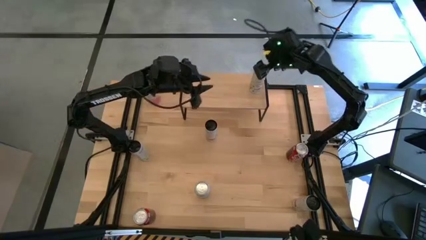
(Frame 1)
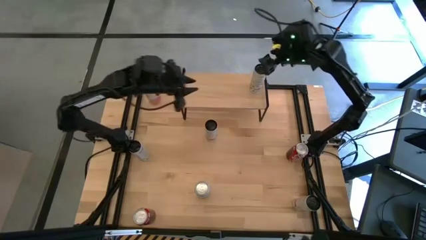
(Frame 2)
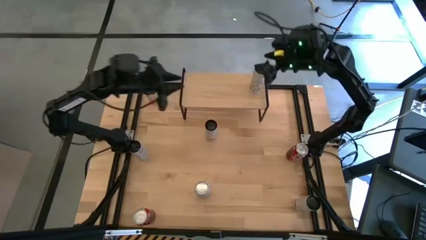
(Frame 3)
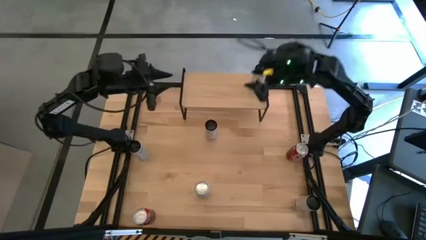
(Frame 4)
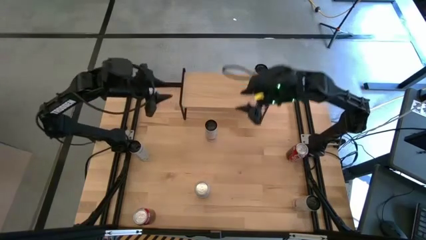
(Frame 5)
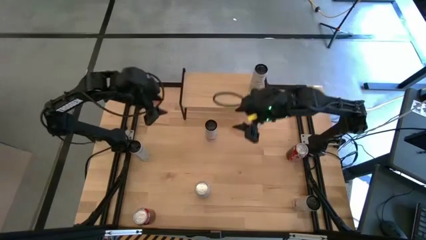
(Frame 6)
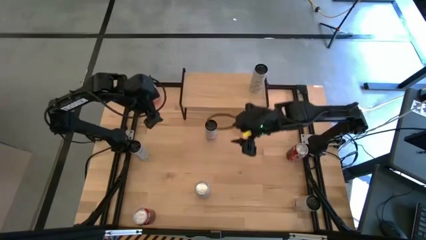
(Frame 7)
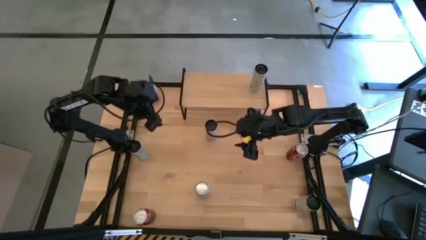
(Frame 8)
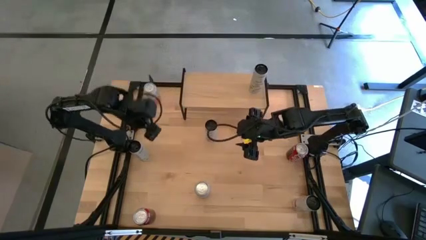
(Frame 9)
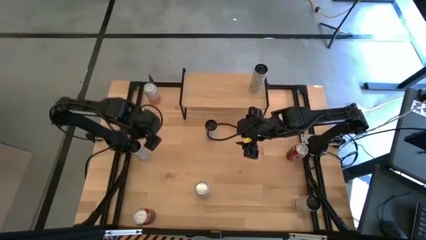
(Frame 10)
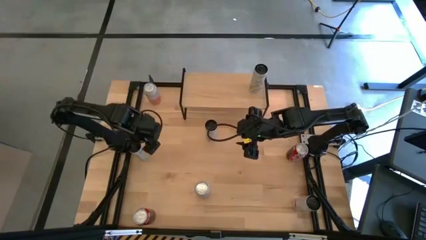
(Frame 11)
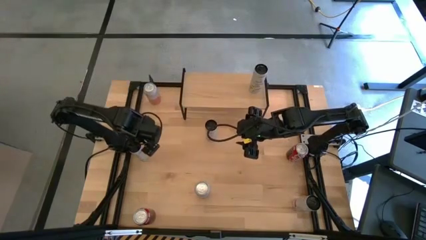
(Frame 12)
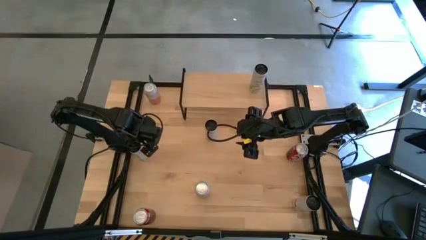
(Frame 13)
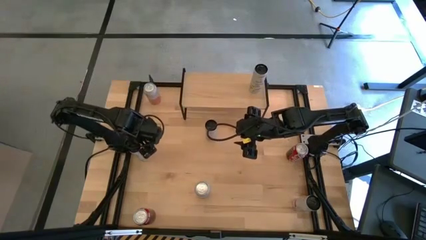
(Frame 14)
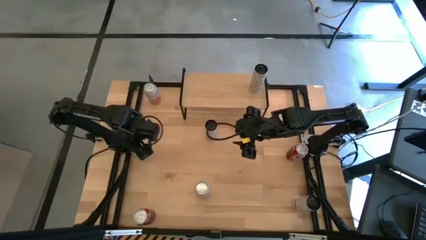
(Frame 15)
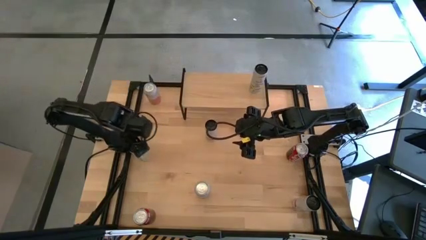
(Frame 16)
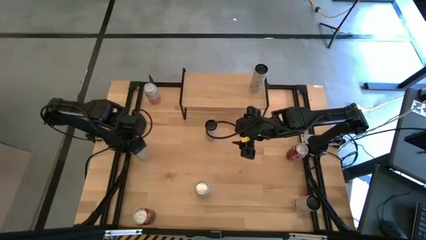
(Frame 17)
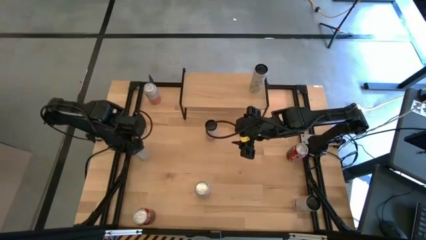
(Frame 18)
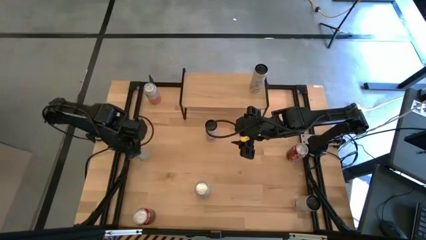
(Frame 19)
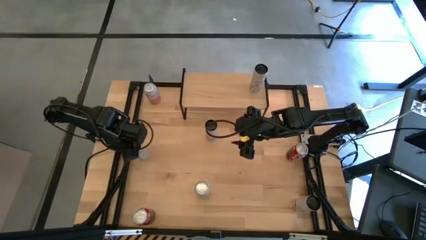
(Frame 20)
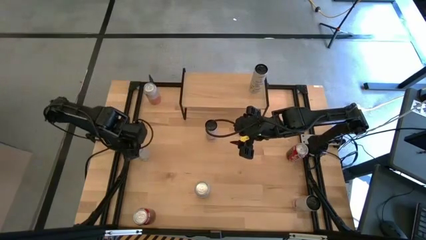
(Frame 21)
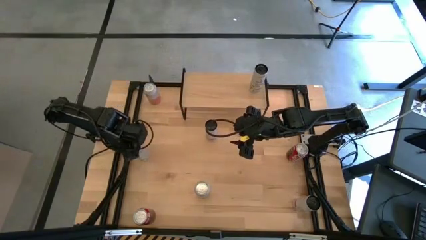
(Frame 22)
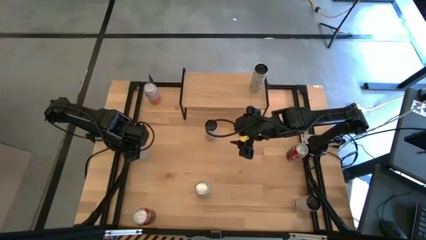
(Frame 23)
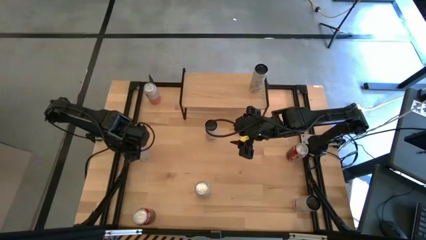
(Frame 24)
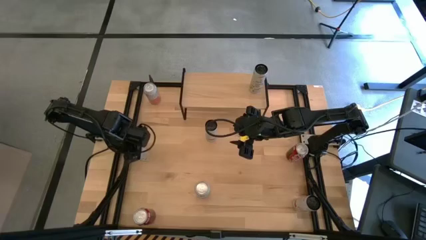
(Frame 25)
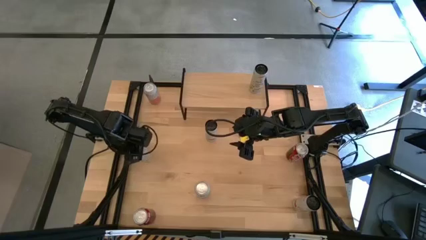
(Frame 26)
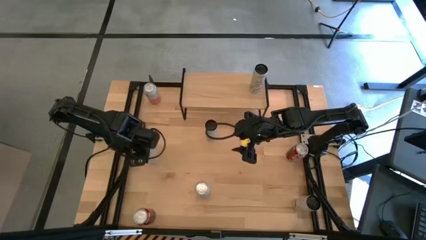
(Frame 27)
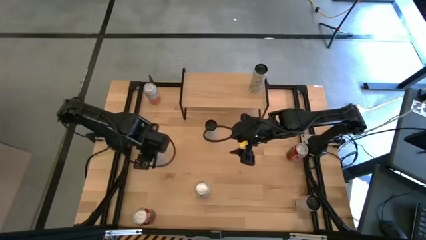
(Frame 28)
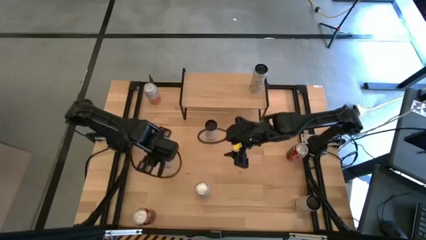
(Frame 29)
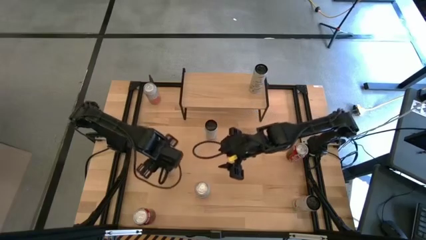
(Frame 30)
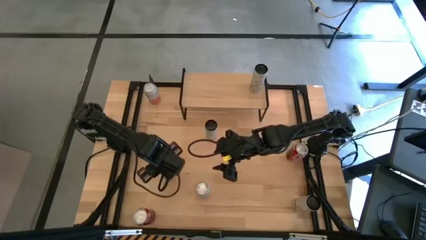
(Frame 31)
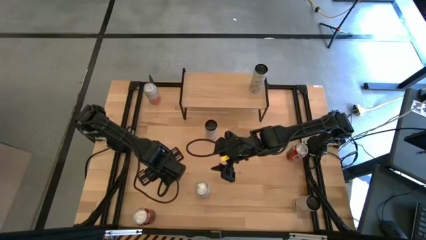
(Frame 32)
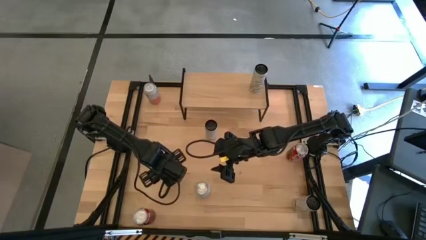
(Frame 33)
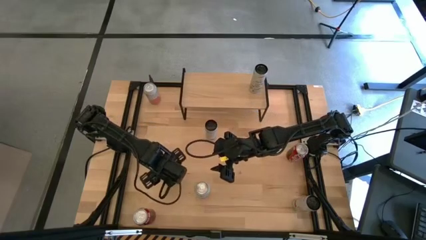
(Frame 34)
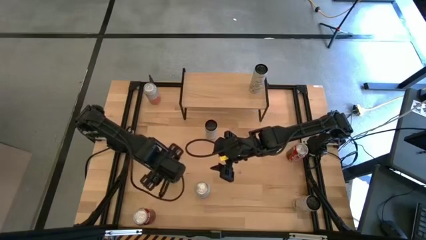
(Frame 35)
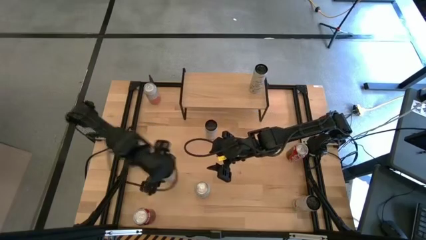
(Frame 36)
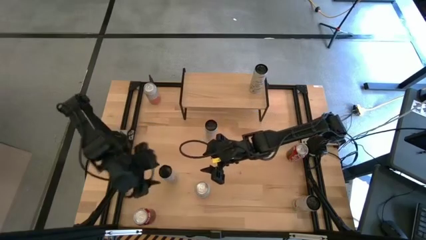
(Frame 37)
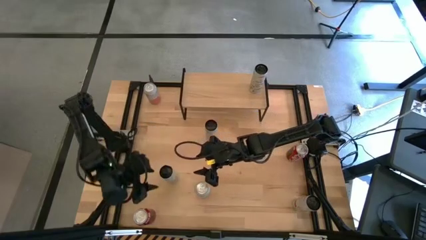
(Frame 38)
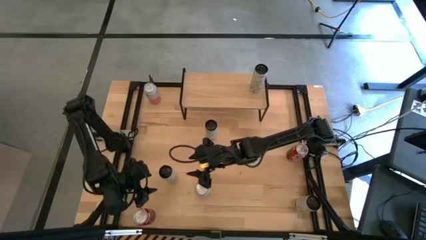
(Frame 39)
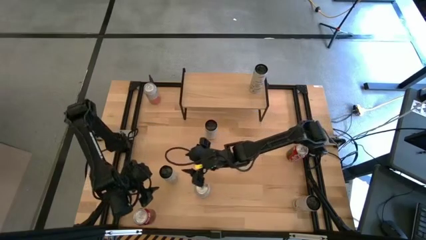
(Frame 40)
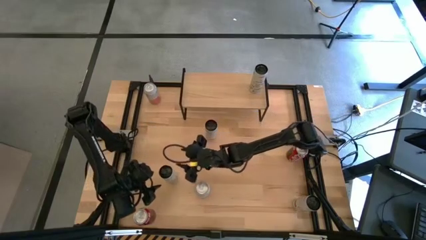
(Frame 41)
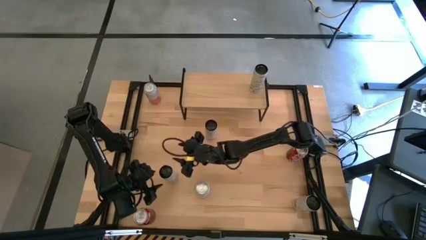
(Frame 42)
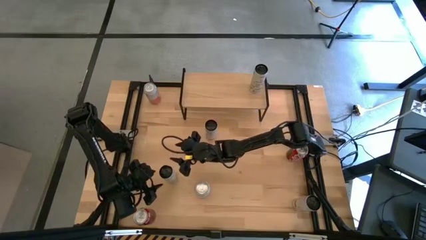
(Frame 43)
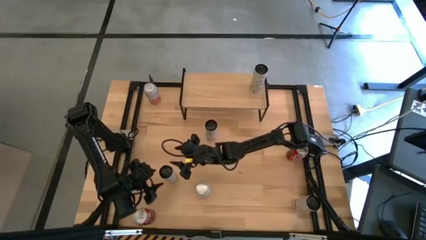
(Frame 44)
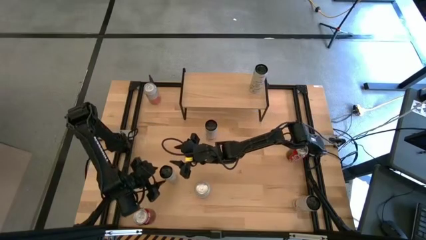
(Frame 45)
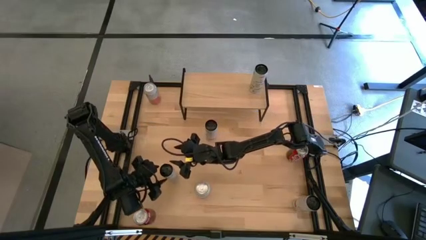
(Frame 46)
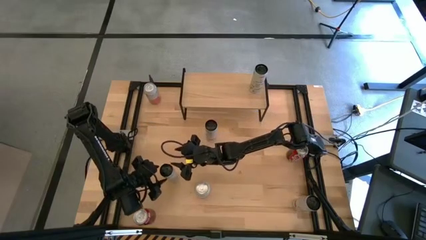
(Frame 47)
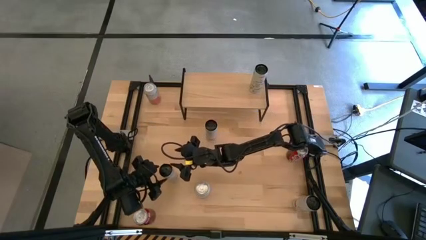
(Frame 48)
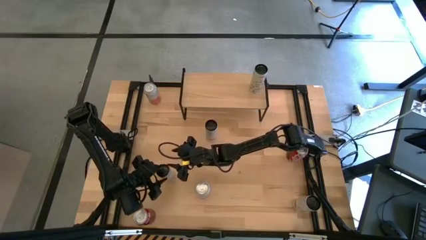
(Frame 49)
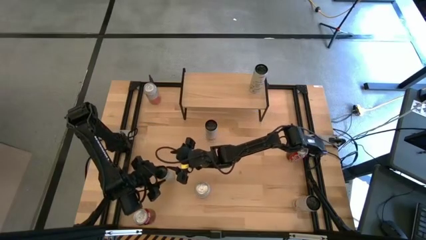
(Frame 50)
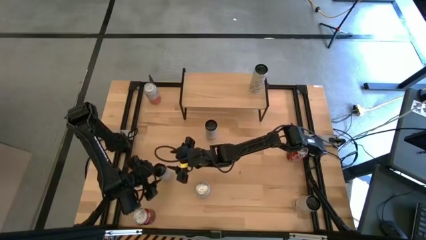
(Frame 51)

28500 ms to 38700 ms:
Task: Place canned beverage on shelf
Put the white and yellow soda can aligned with other white and yellow soda can on the shelf

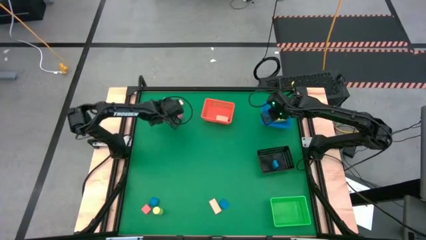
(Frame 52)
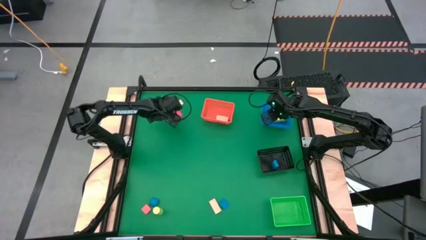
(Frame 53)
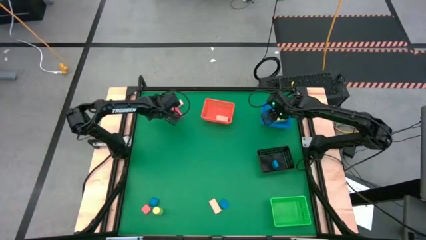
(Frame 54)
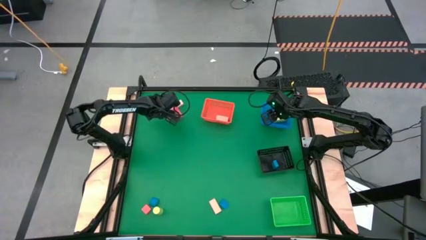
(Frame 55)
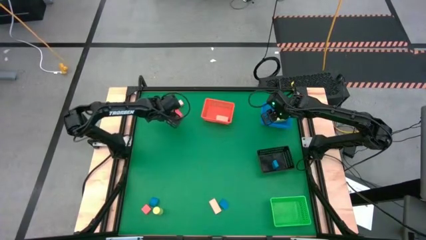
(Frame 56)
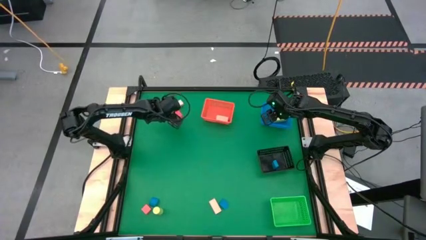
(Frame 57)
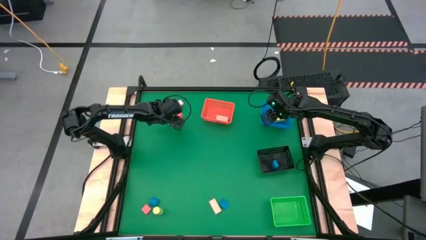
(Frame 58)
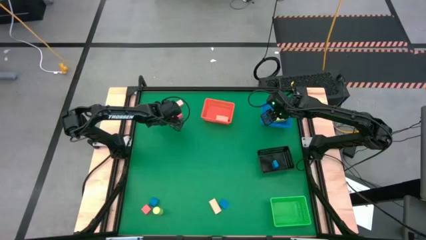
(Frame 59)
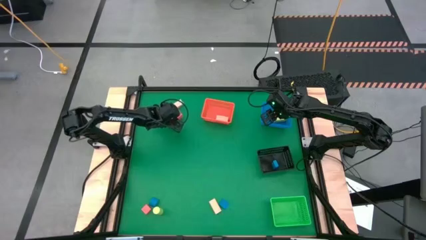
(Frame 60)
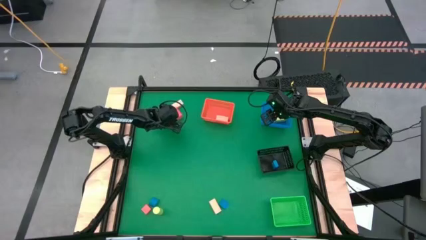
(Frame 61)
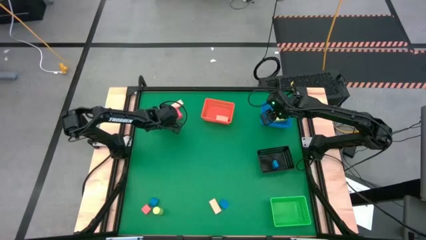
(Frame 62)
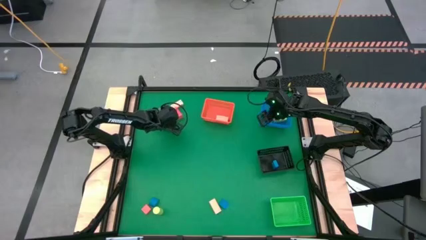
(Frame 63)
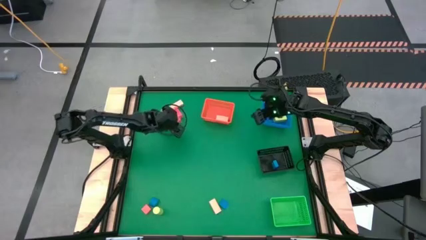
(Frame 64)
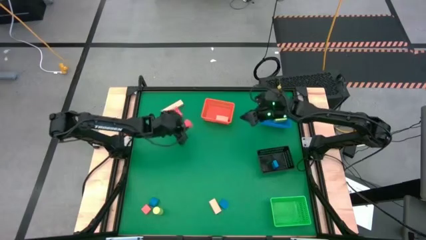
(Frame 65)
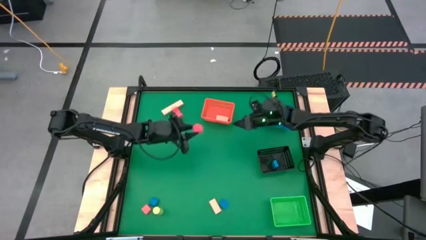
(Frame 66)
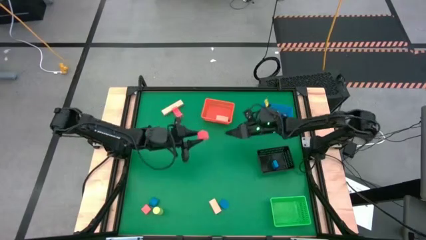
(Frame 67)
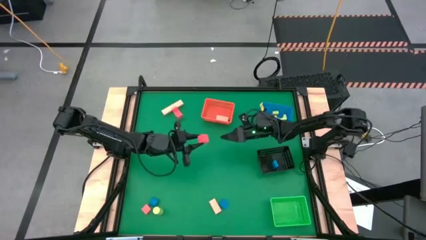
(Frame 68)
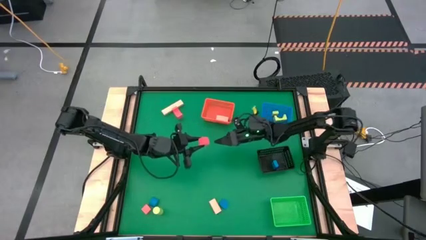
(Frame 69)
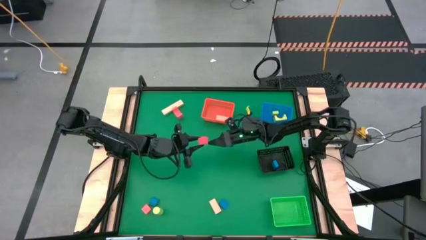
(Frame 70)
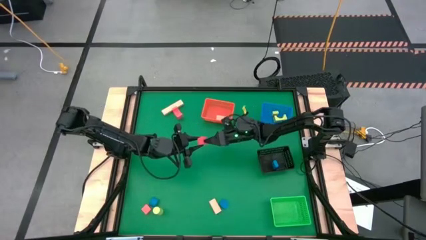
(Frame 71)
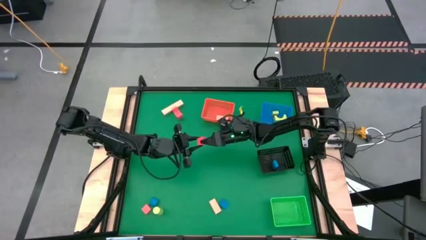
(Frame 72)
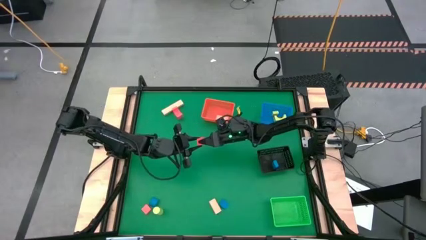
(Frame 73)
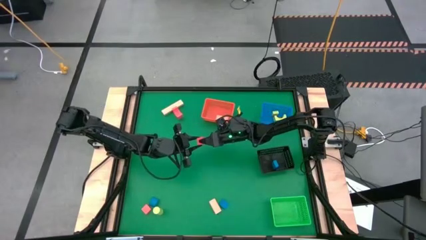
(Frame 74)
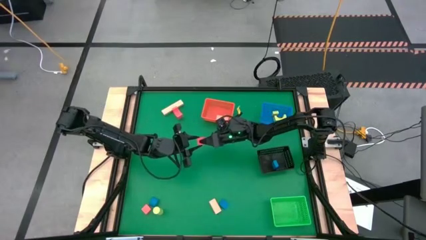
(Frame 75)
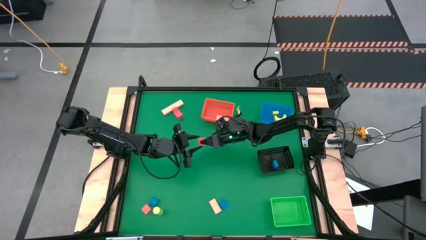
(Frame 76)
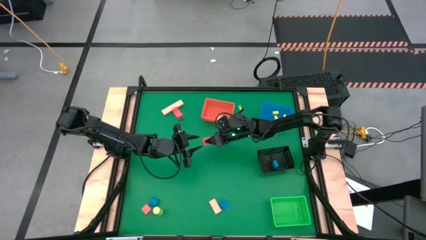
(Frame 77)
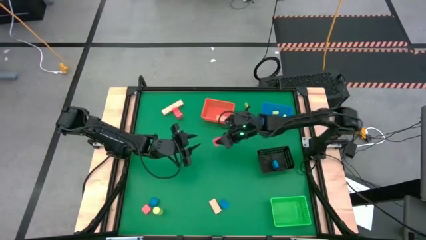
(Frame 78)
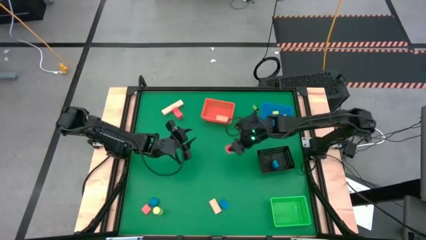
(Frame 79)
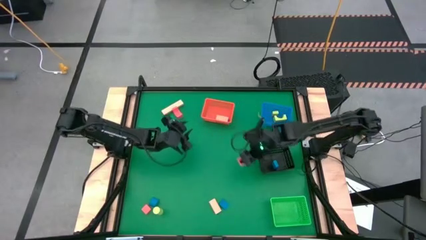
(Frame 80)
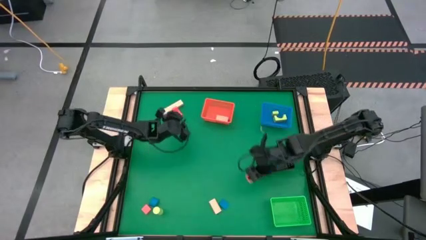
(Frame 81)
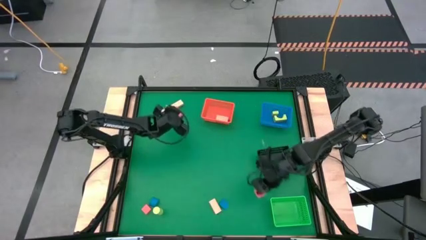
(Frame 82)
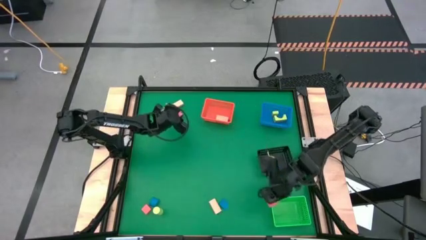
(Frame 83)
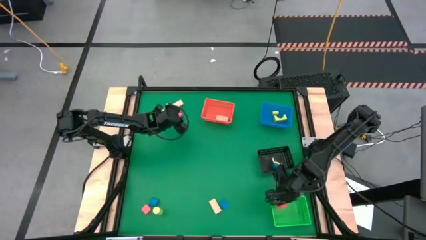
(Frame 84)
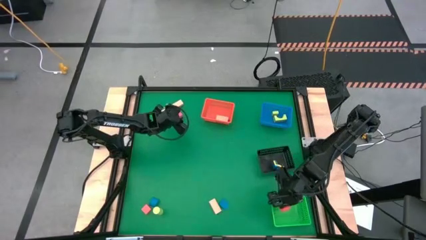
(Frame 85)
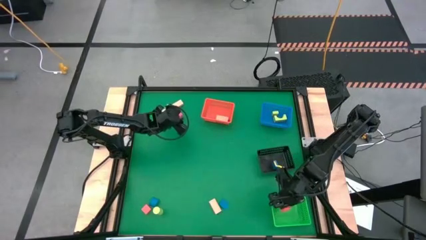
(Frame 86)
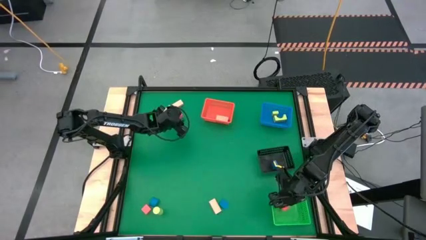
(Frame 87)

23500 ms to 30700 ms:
Task: Sort & place blocks by color
Put the top left orange block into the green bin
